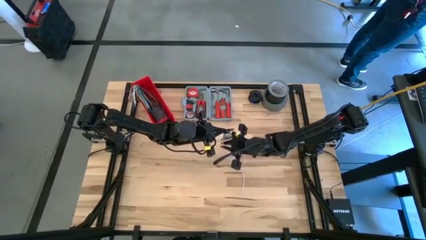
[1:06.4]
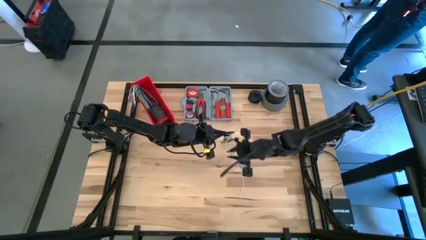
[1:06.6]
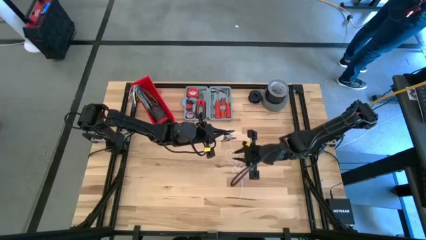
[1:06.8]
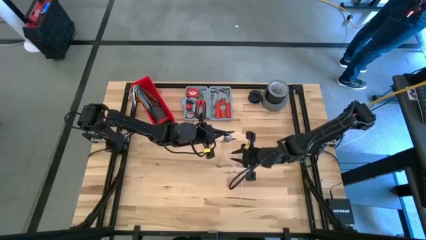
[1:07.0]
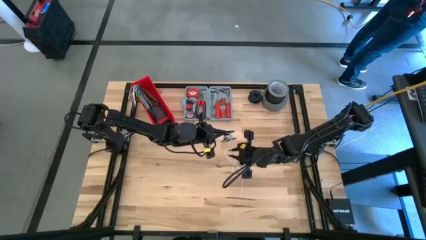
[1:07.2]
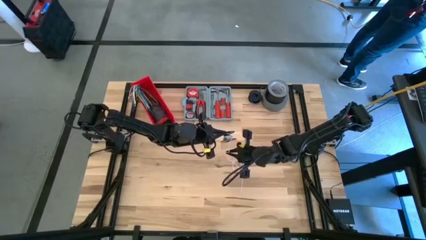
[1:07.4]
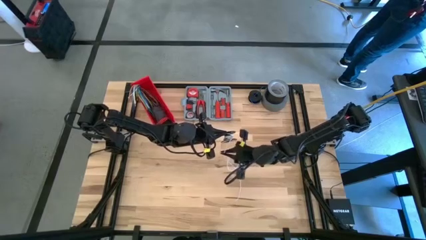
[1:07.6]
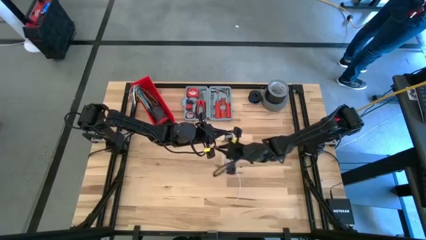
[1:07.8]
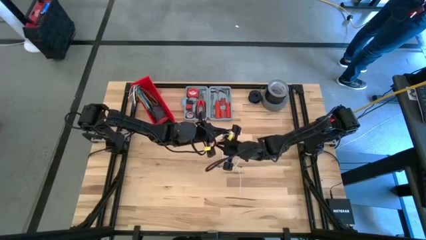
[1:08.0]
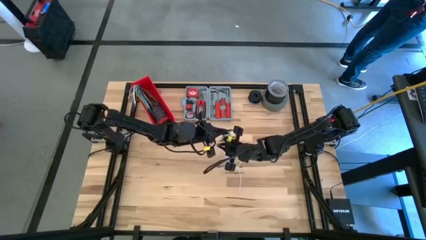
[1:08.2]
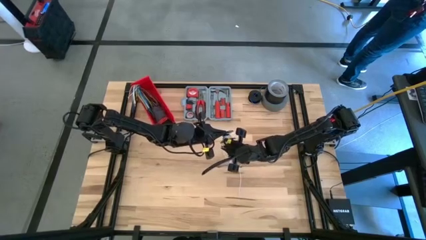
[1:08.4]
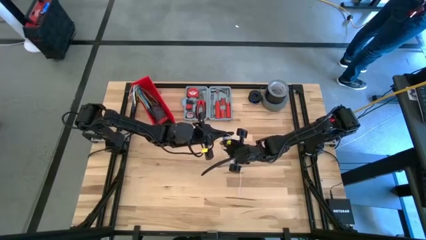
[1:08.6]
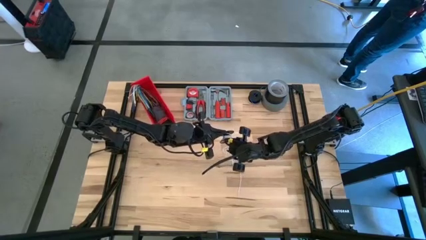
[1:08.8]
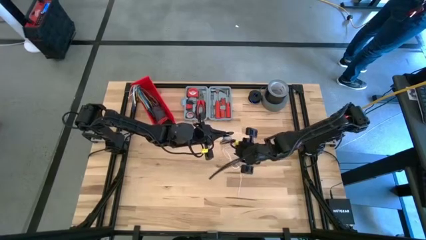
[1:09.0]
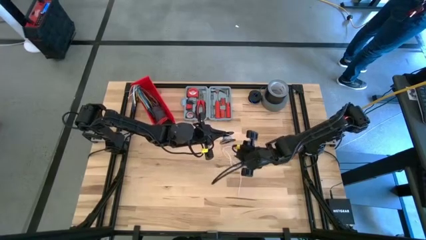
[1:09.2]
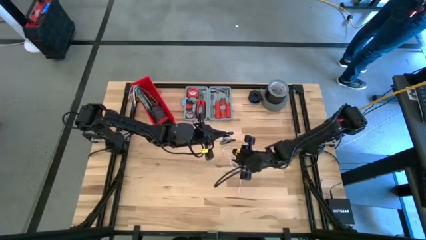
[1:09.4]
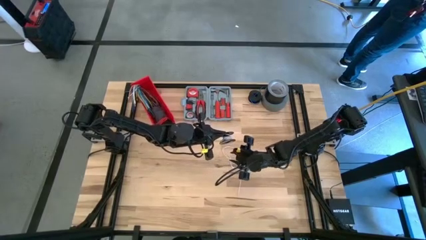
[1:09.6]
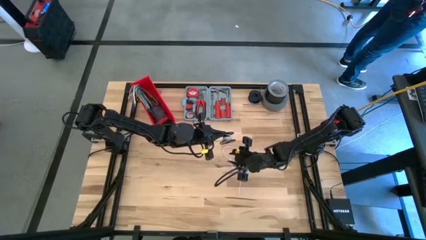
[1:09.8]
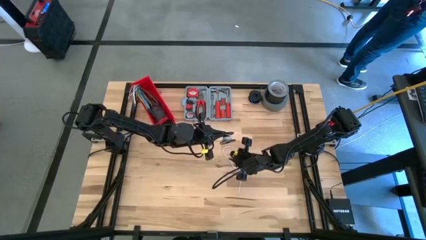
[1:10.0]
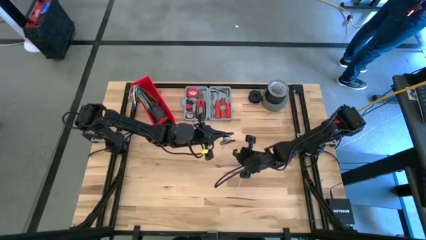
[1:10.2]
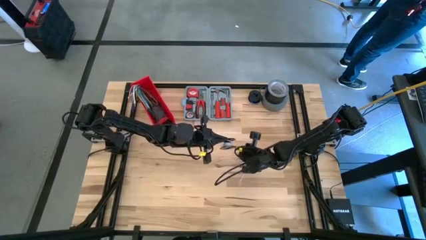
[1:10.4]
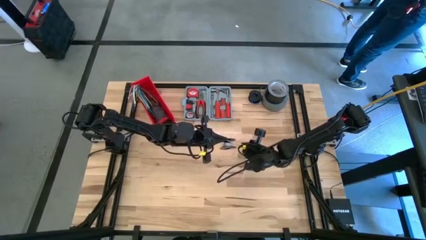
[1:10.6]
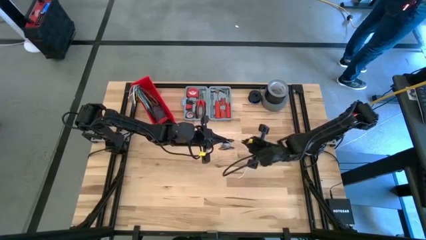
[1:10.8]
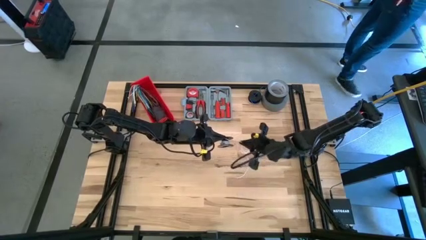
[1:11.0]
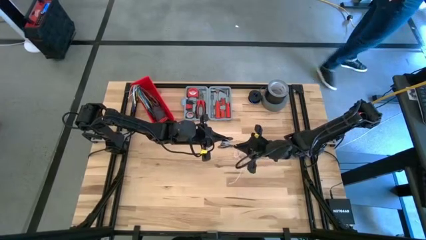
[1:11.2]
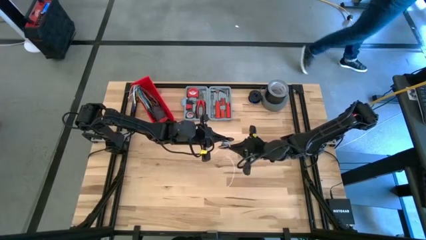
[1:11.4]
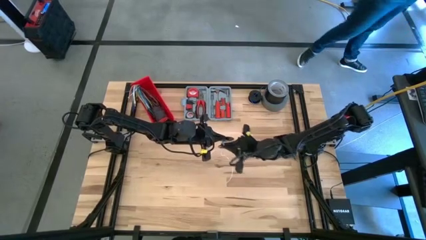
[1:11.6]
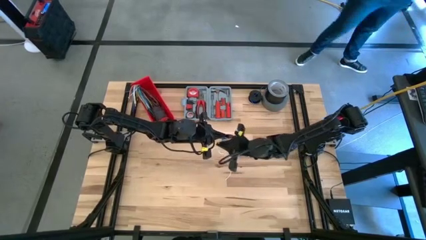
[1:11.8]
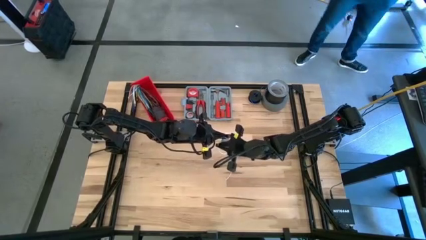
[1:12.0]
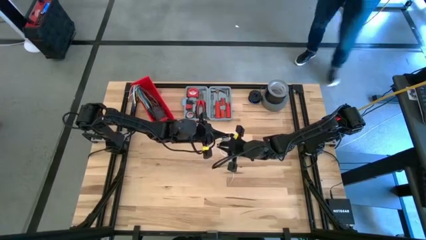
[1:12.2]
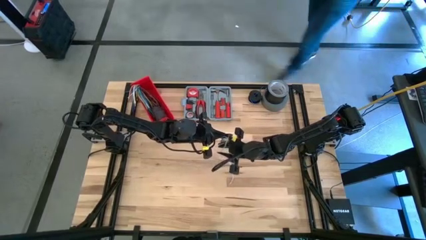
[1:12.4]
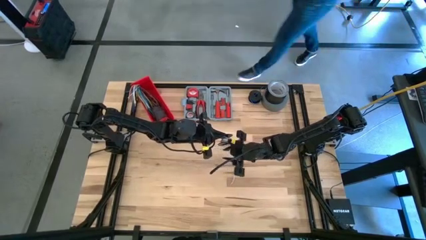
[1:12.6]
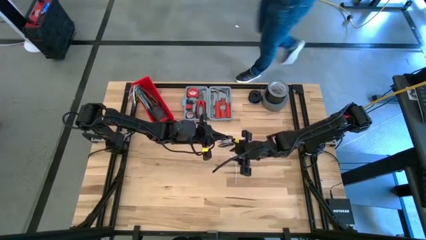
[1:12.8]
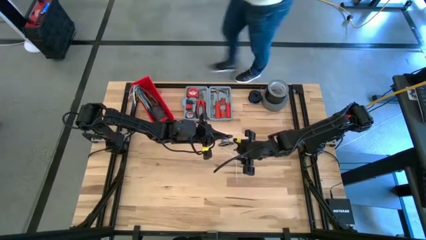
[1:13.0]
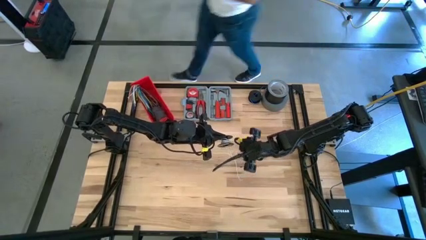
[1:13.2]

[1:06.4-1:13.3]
Task: Coil cords
Coil the white wire into the spool
